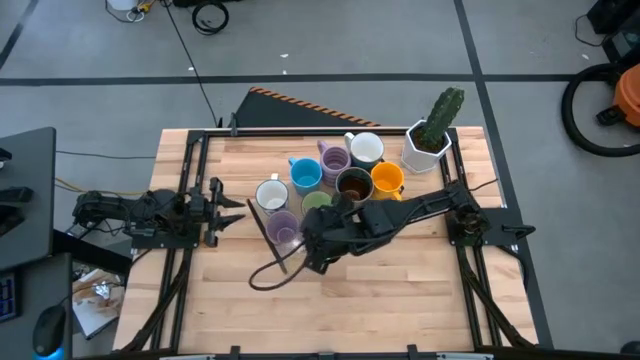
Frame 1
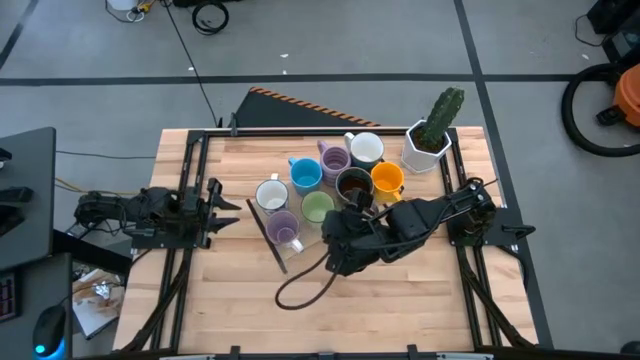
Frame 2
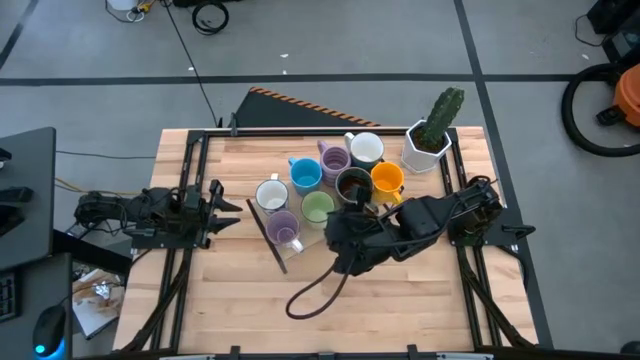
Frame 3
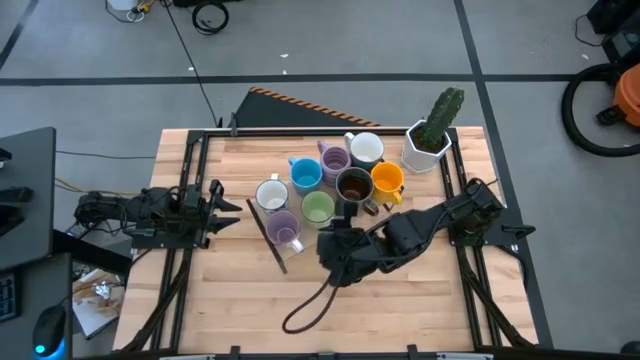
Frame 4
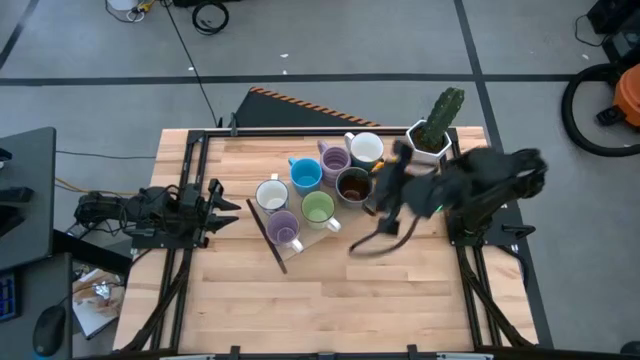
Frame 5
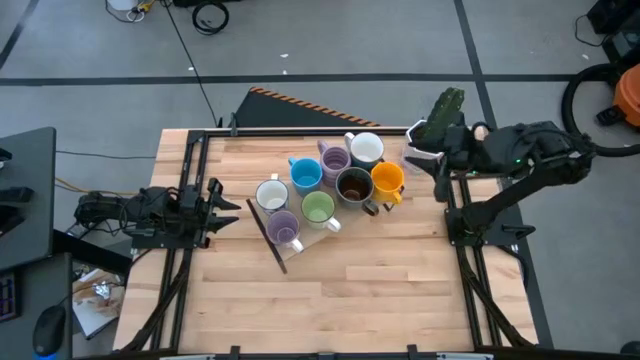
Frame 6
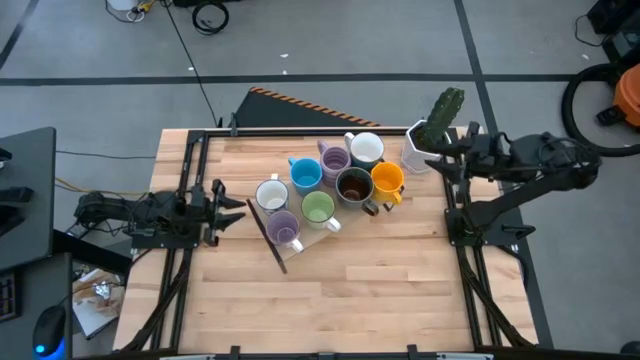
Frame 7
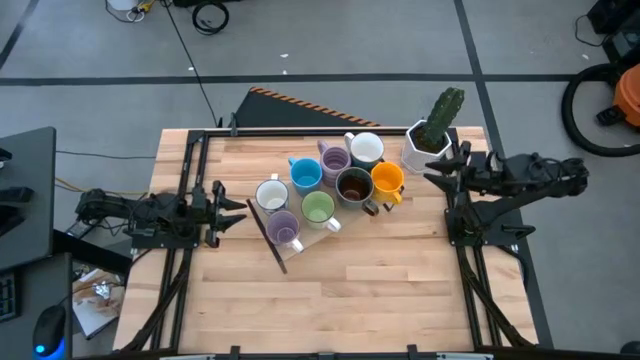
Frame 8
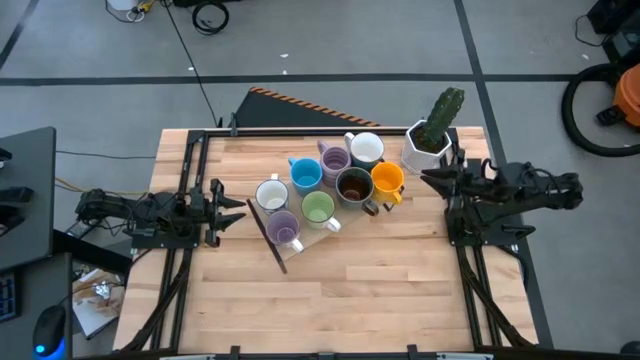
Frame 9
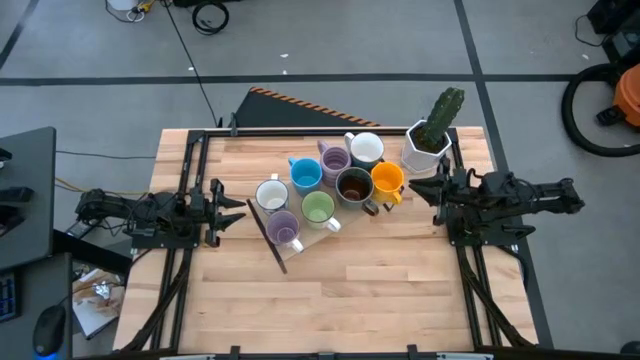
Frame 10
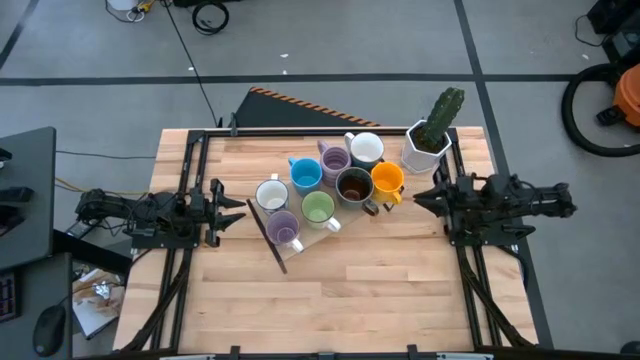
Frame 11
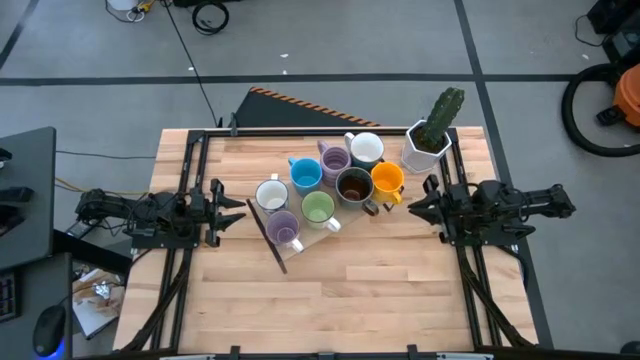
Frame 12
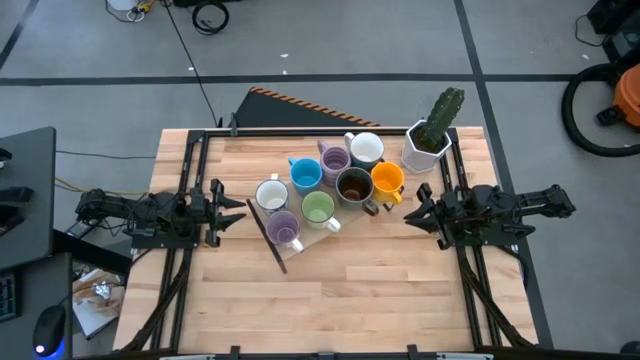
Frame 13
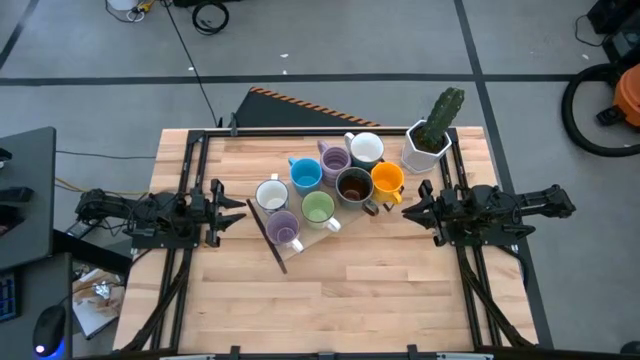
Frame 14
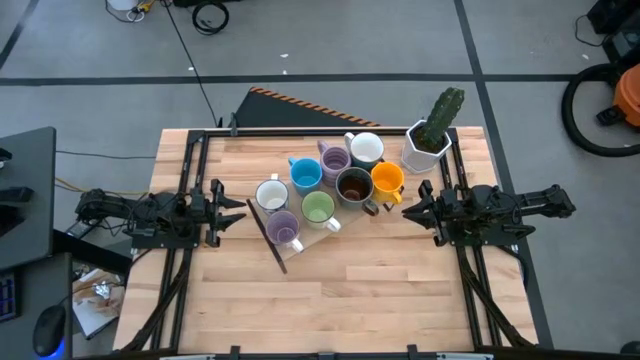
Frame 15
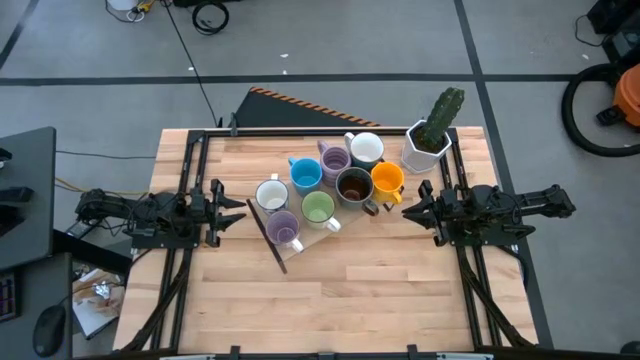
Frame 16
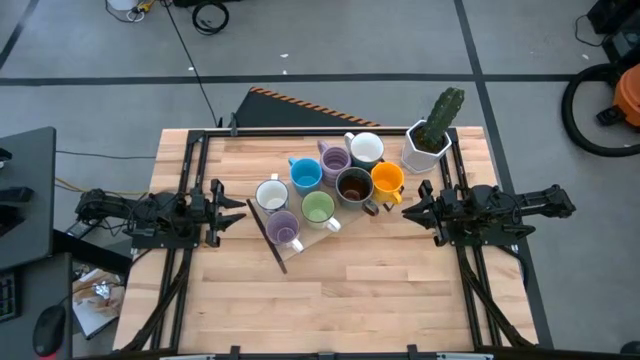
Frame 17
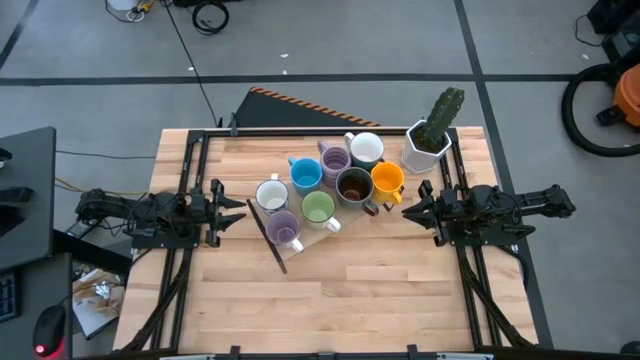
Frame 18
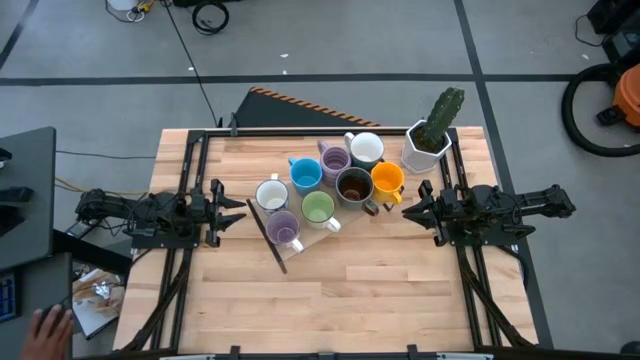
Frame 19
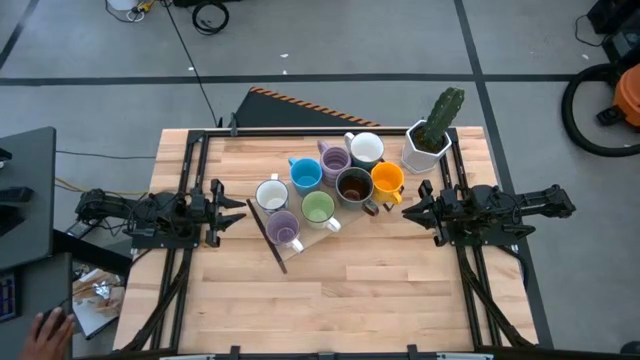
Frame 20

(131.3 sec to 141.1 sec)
Task: Place coffee mugs
Return to Home Position

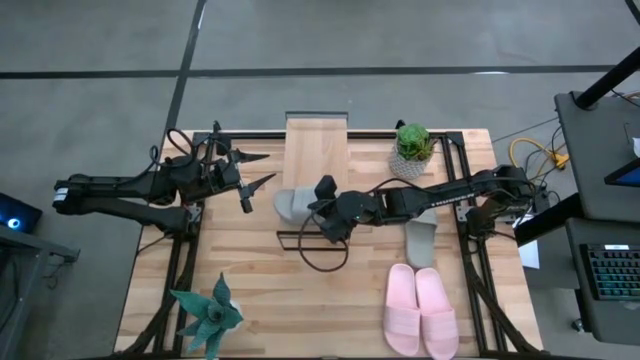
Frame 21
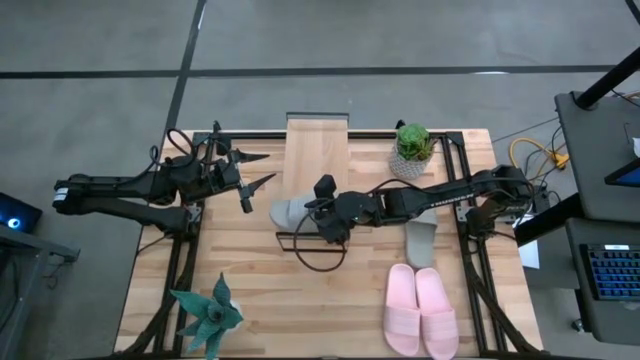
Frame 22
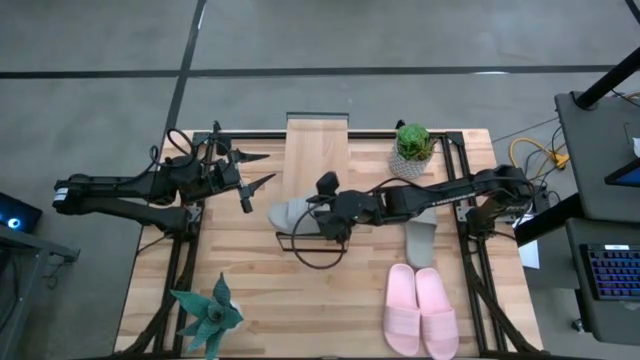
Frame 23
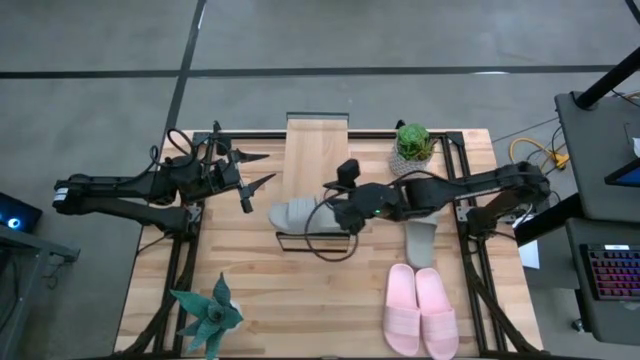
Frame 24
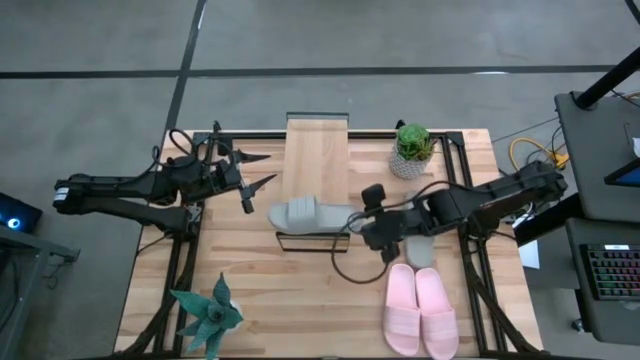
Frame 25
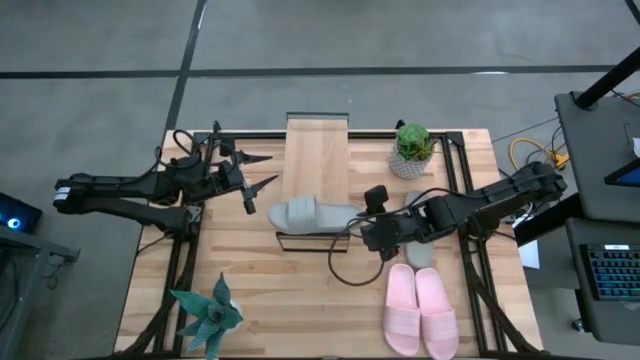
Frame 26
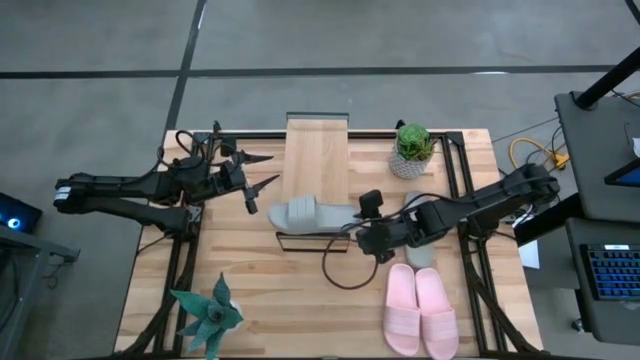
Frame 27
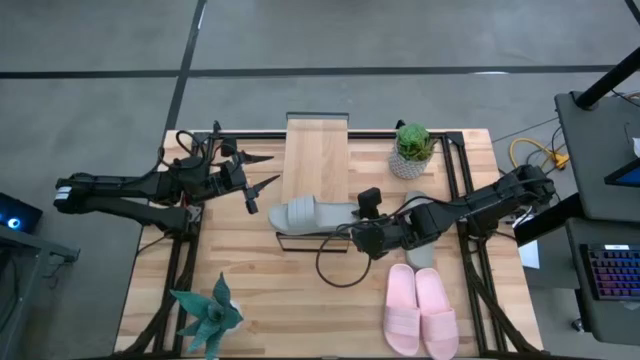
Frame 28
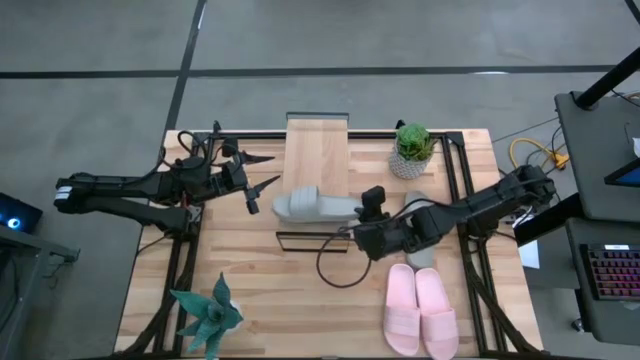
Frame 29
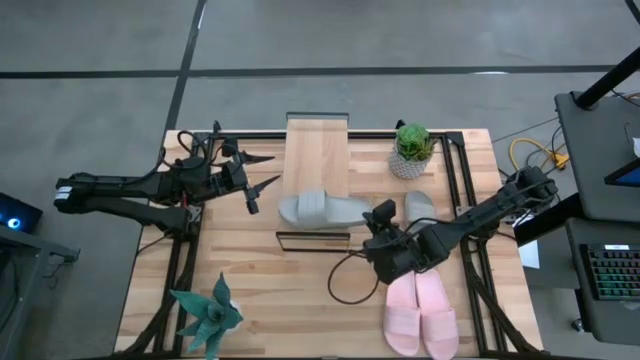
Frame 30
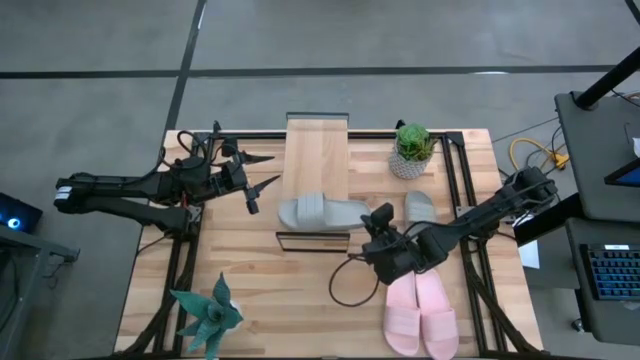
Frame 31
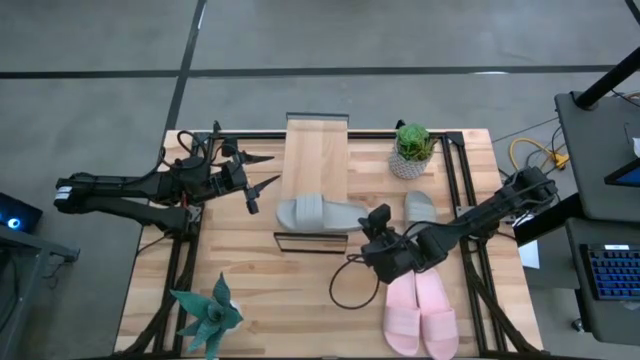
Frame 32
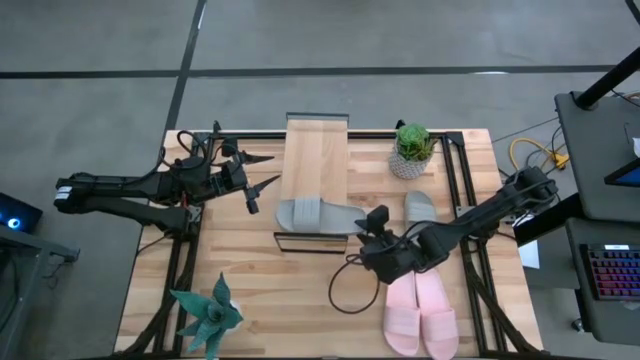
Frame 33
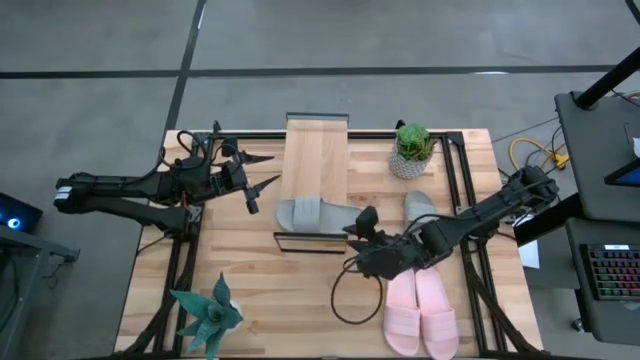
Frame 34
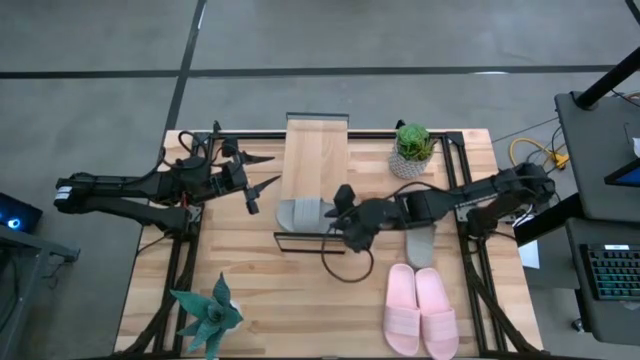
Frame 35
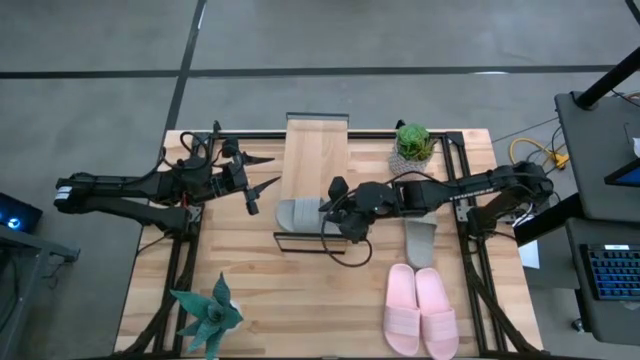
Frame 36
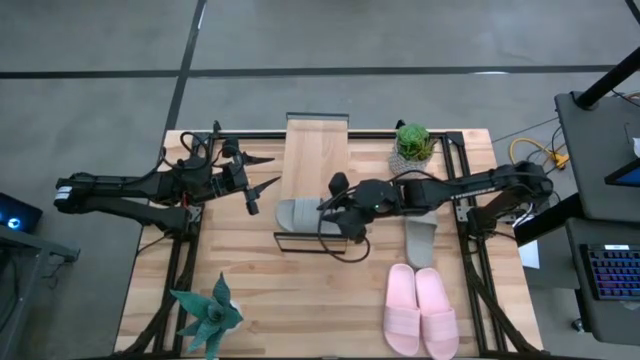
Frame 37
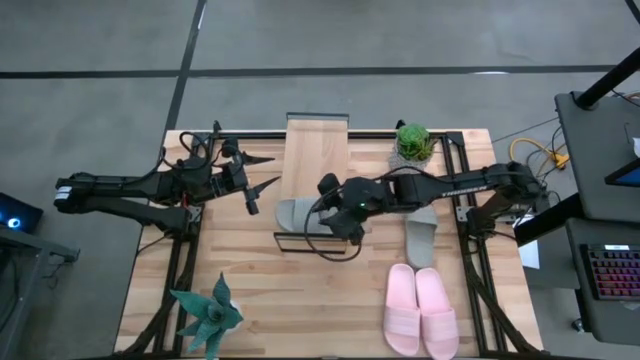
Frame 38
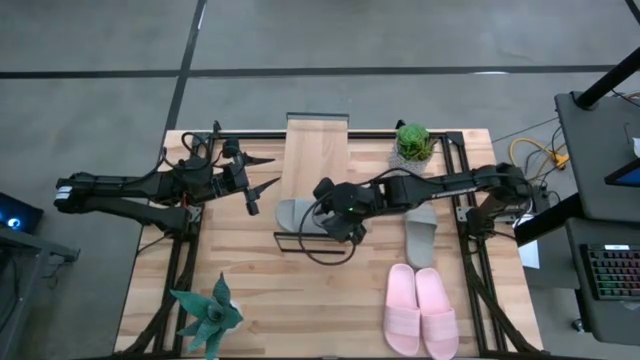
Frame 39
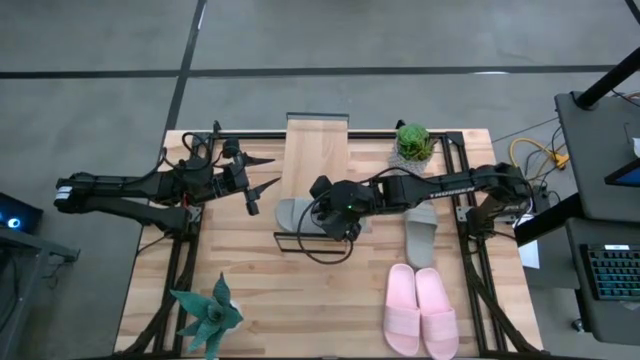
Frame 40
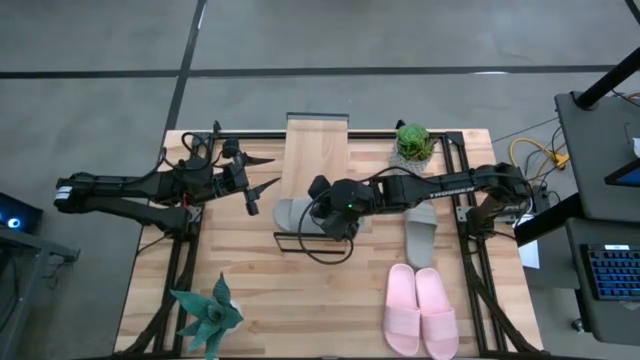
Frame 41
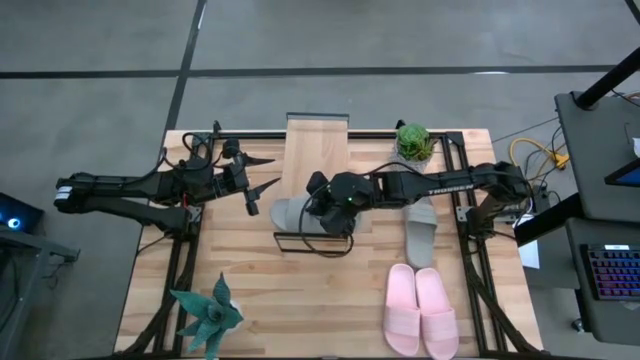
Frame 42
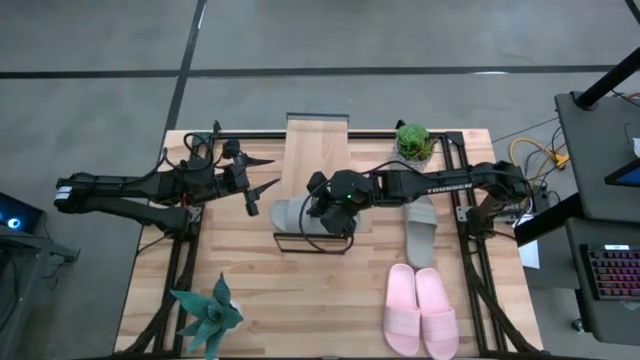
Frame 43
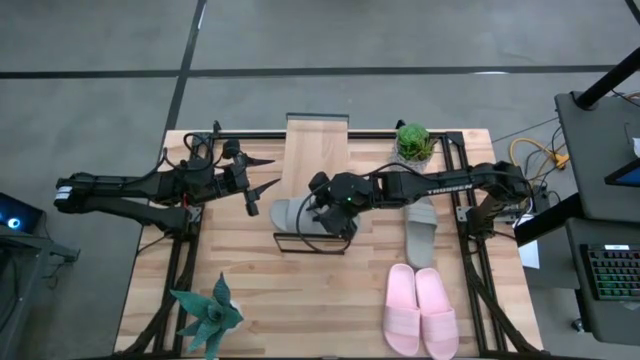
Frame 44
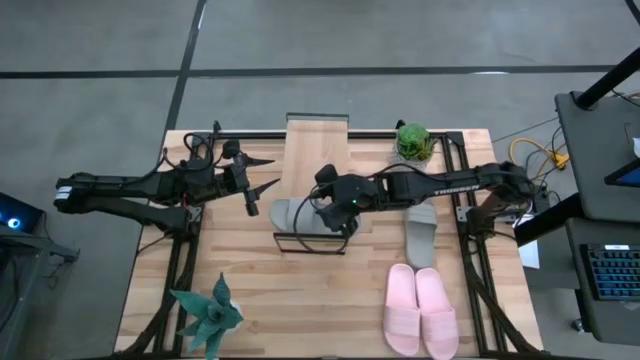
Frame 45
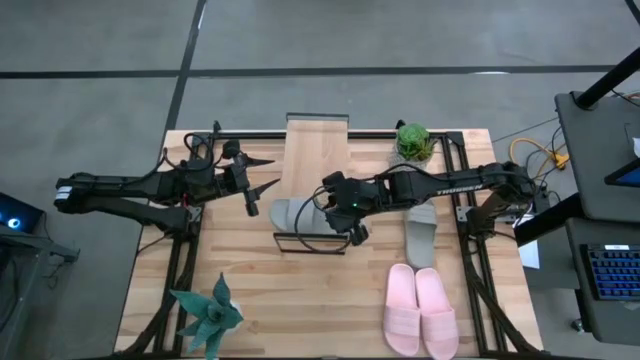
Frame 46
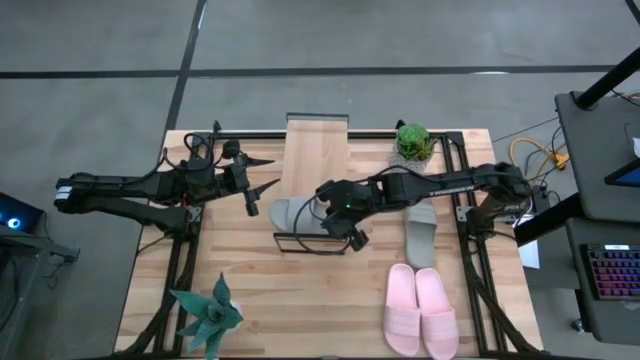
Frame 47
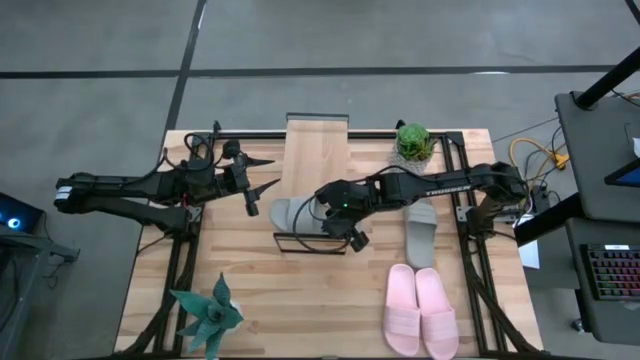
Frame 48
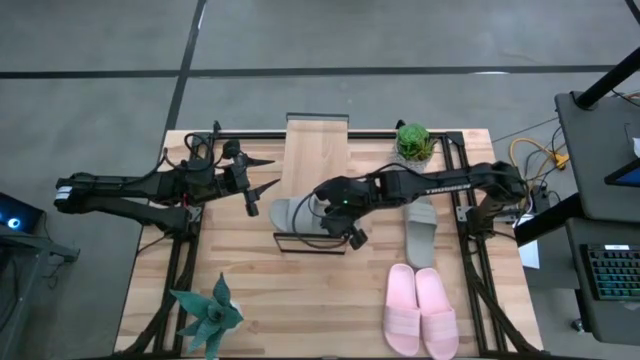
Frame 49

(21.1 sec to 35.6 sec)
Task: Pick and place slides into the shelf
Put the left gray slide on the shelf
